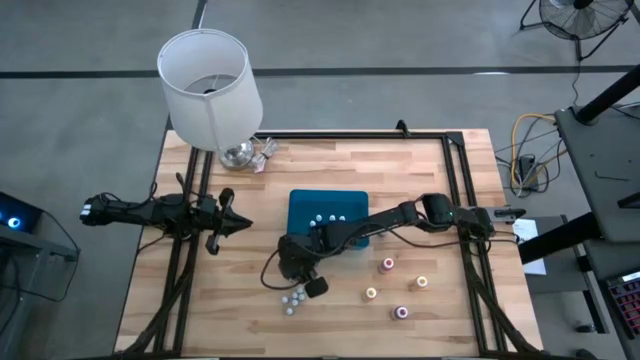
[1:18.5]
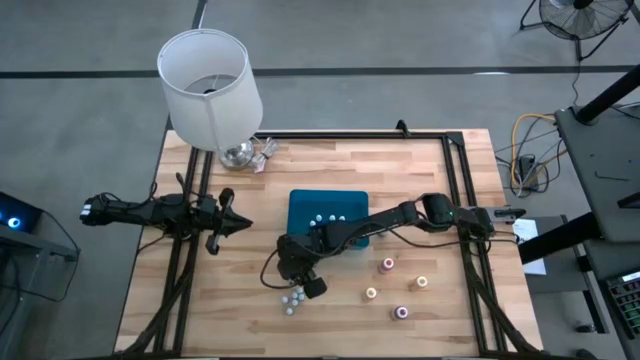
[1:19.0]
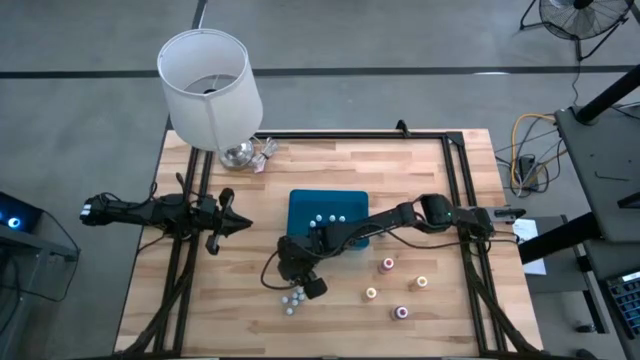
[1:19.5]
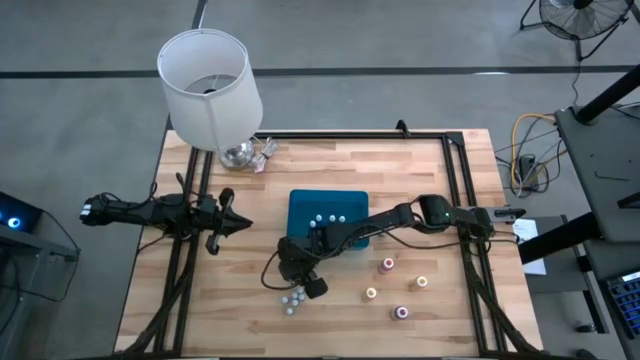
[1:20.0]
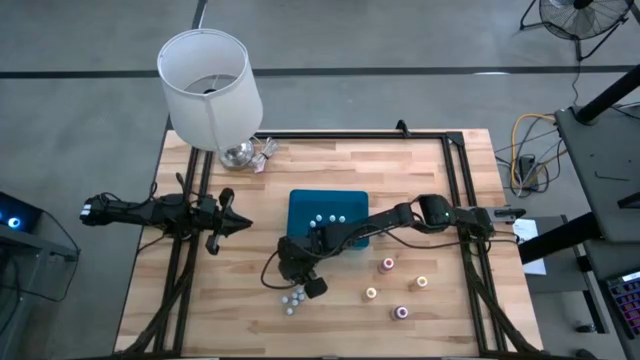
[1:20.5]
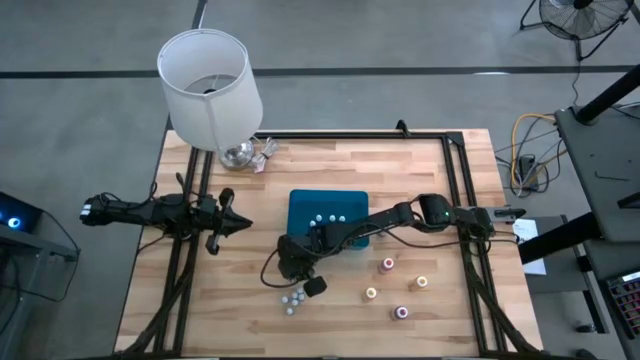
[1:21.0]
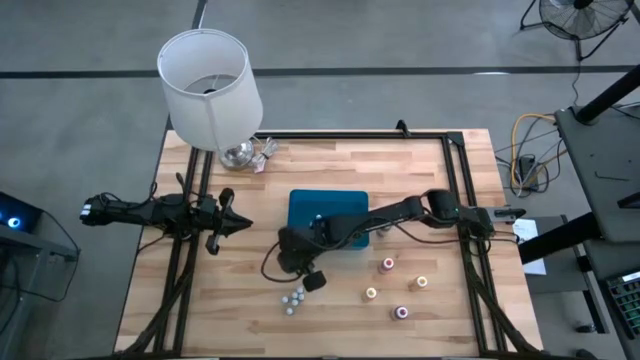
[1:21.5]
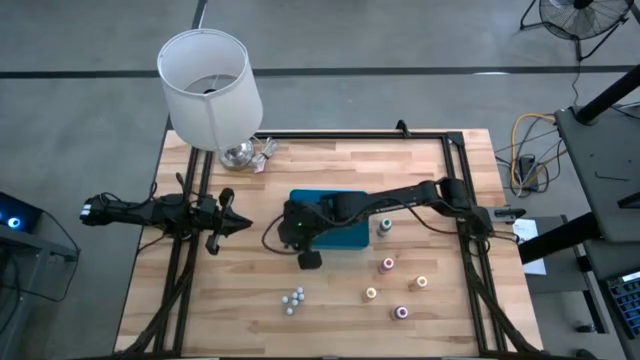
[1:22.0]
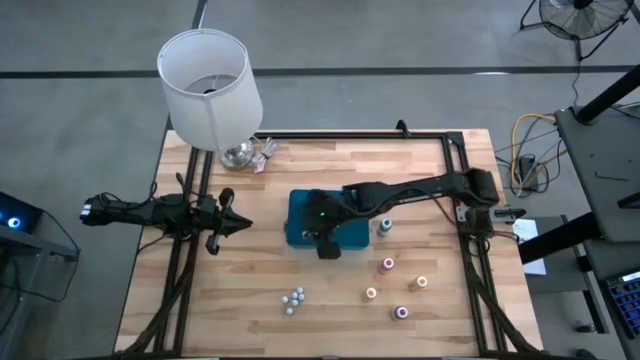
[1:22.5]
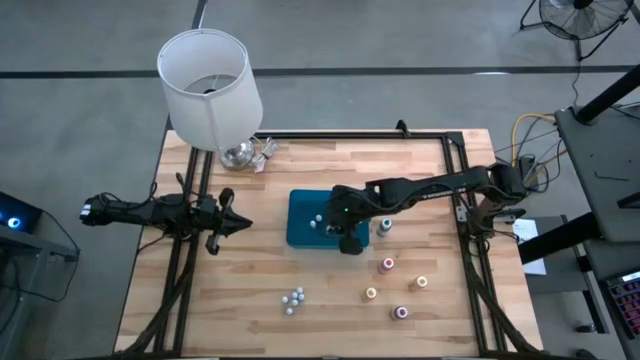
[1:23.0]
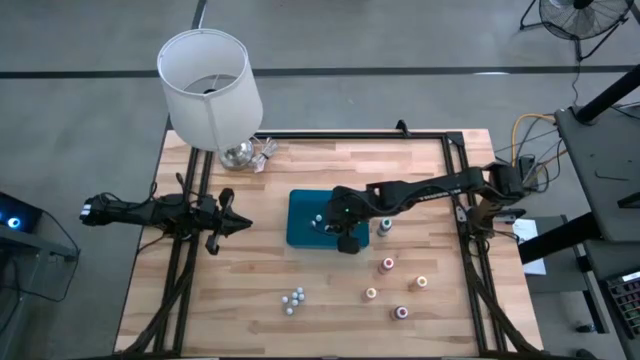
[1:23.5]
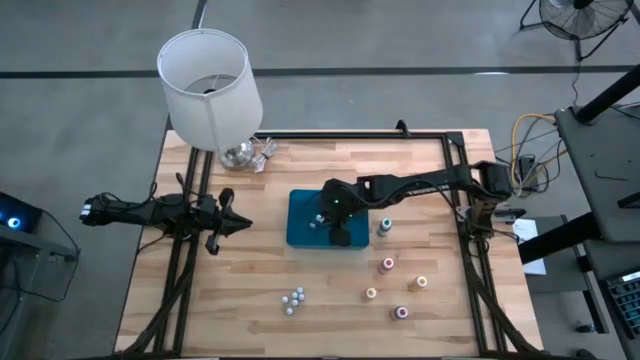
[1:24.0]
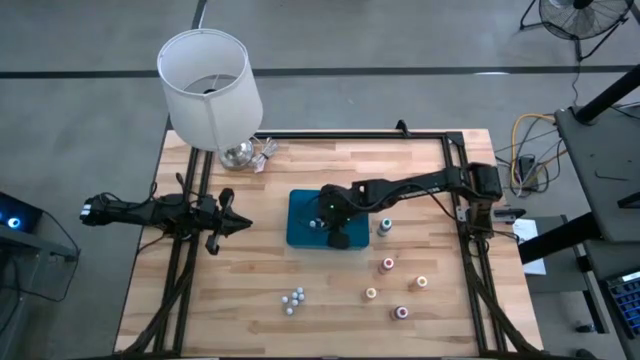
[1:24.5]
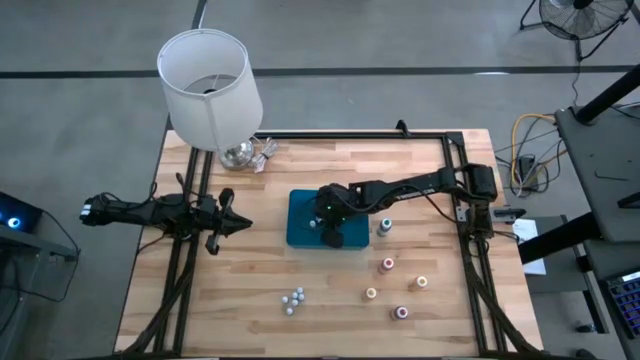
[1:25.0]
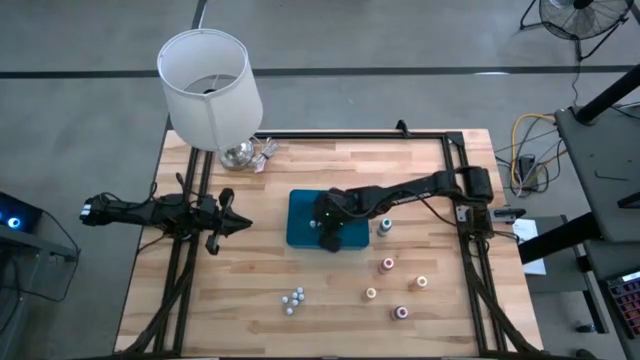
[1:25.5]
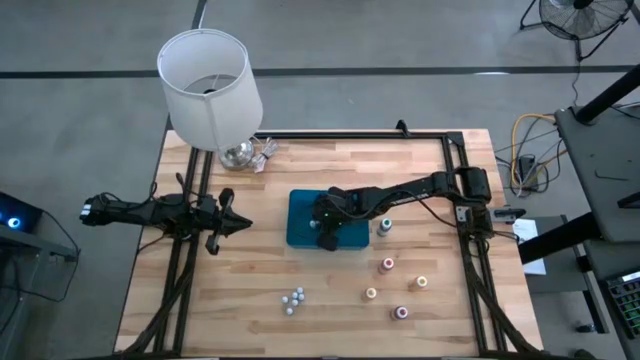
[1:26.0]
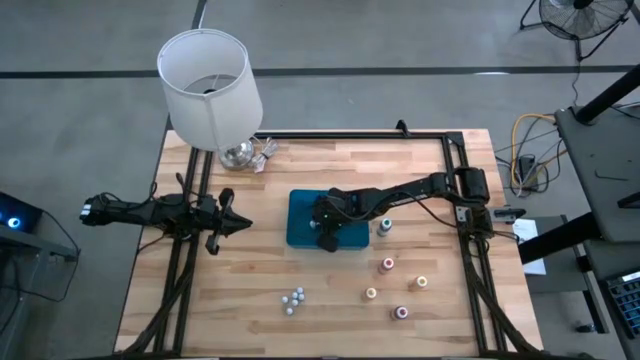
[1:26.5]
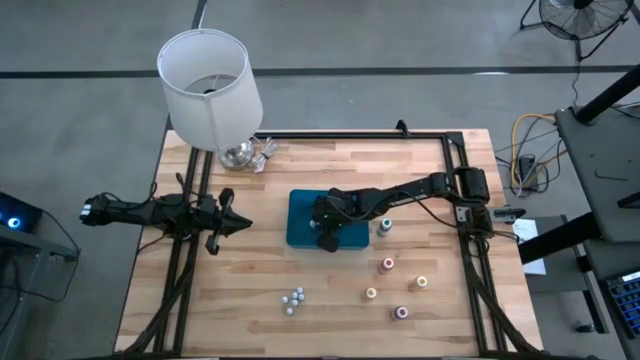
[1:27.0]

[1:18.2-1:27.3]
Task: Pick & Place food coloring
Put the small green food coloring bottle into the blue bin

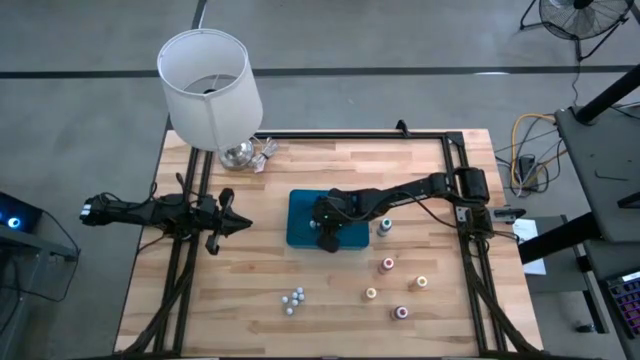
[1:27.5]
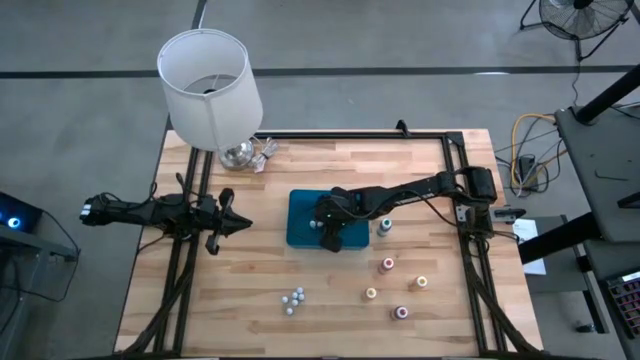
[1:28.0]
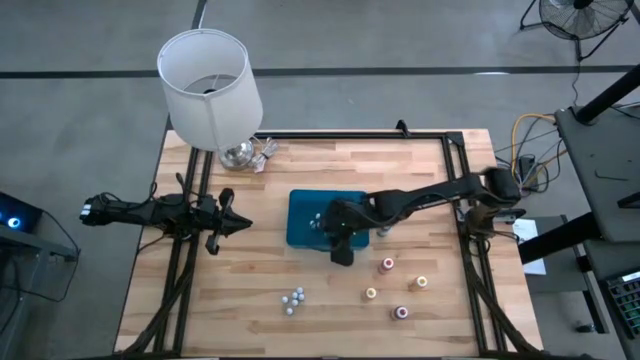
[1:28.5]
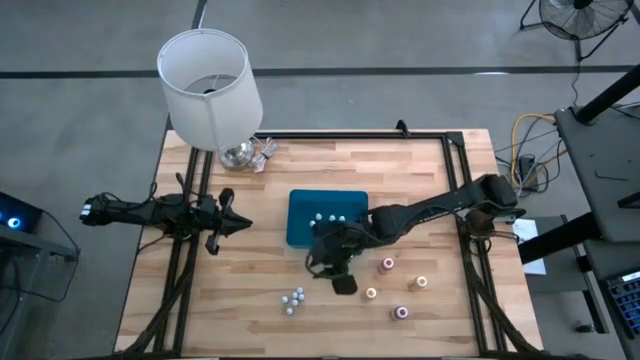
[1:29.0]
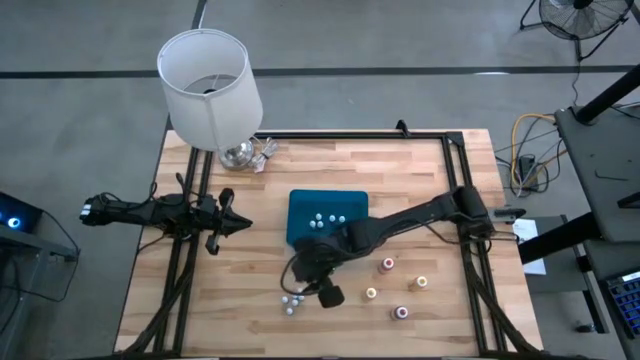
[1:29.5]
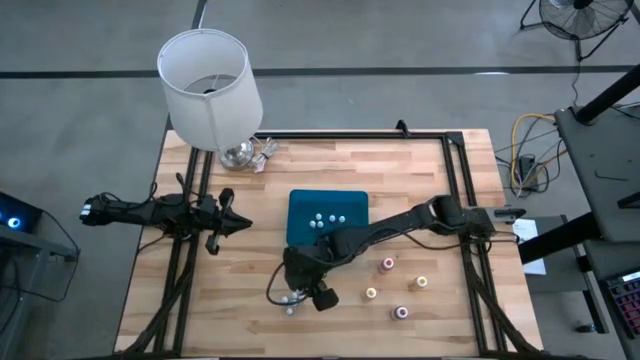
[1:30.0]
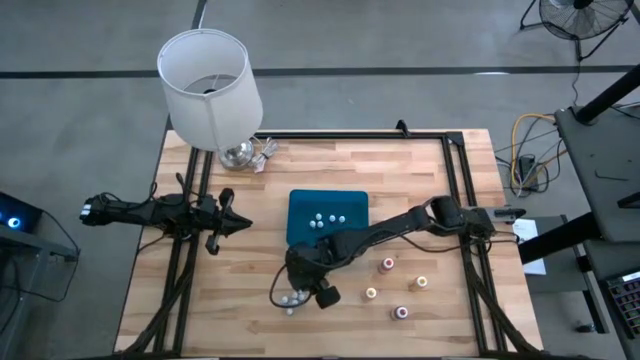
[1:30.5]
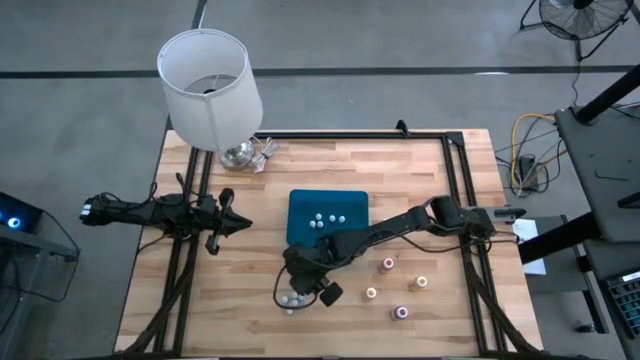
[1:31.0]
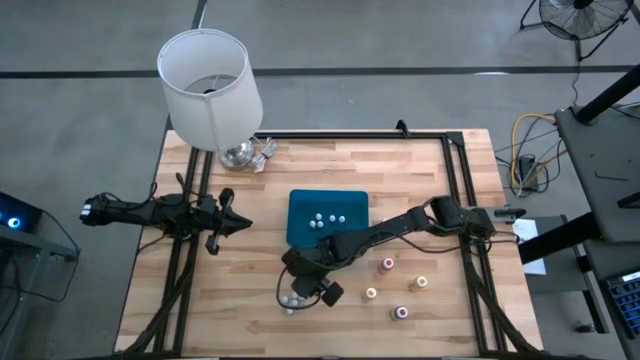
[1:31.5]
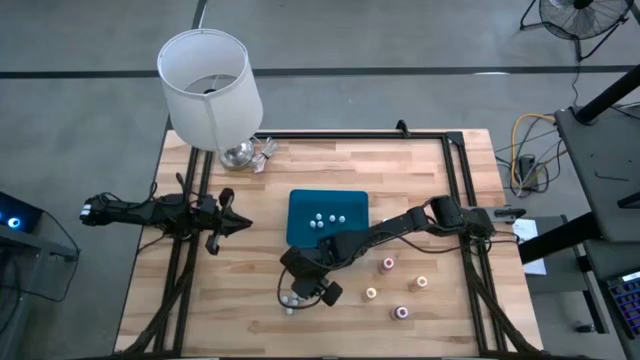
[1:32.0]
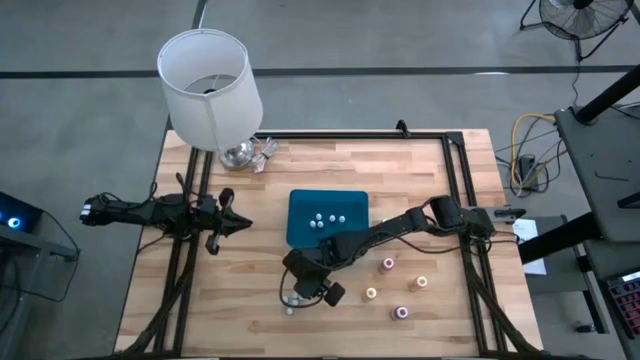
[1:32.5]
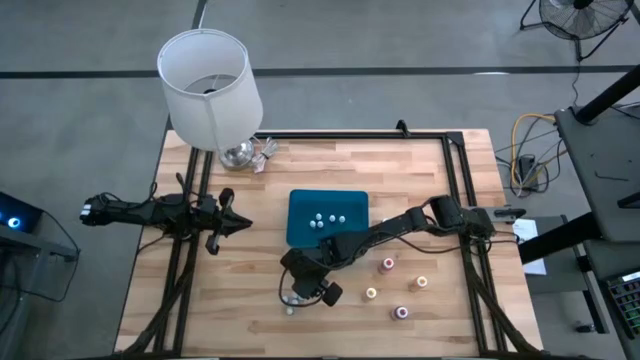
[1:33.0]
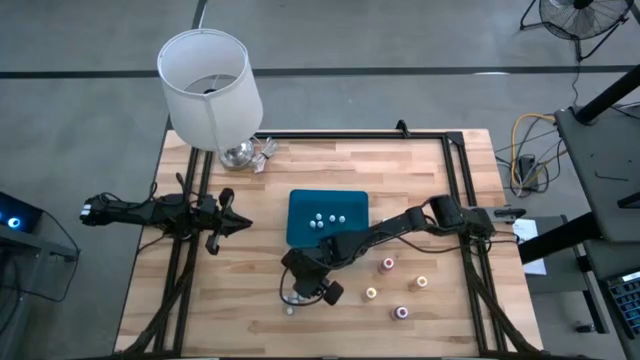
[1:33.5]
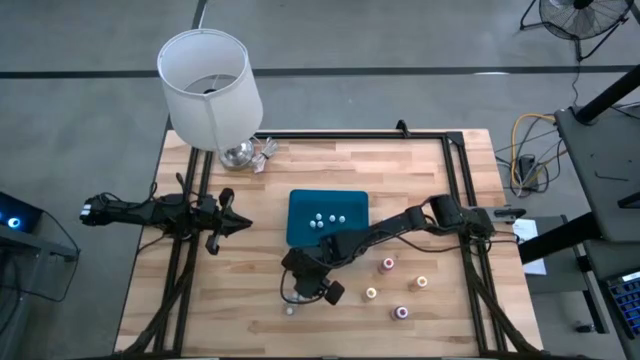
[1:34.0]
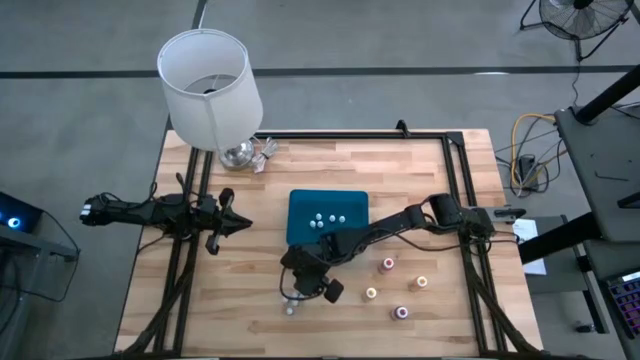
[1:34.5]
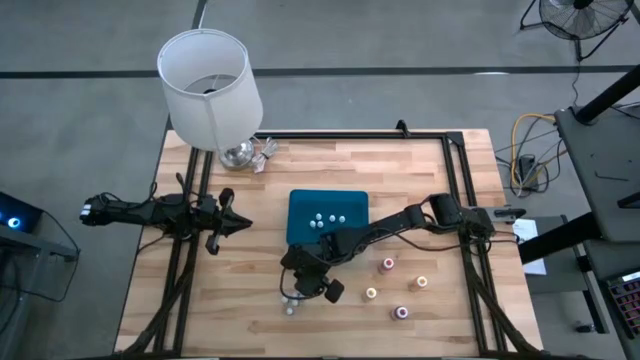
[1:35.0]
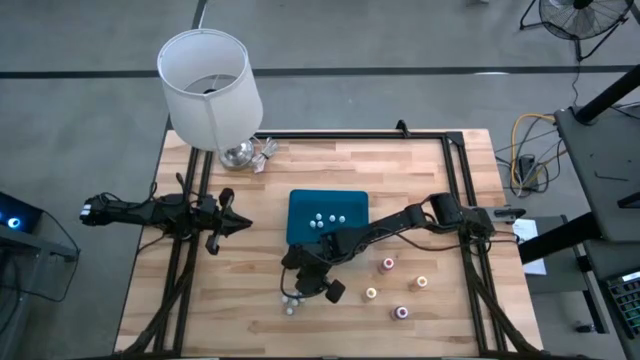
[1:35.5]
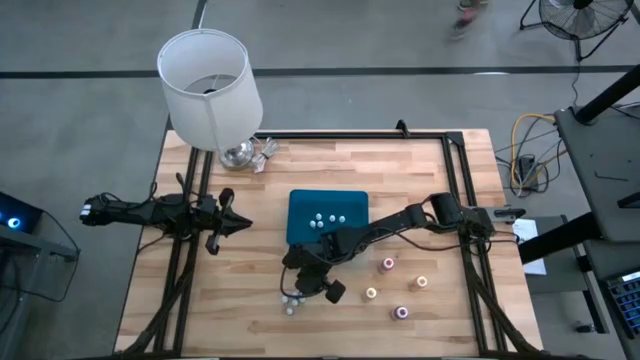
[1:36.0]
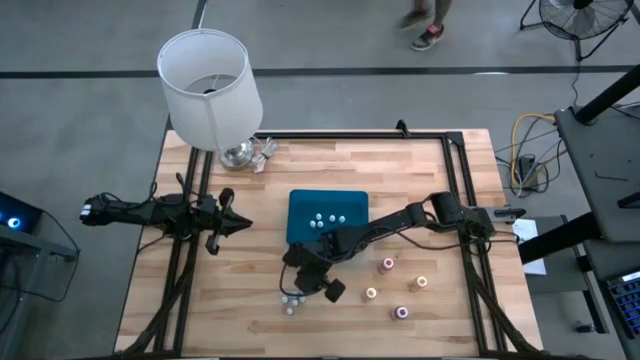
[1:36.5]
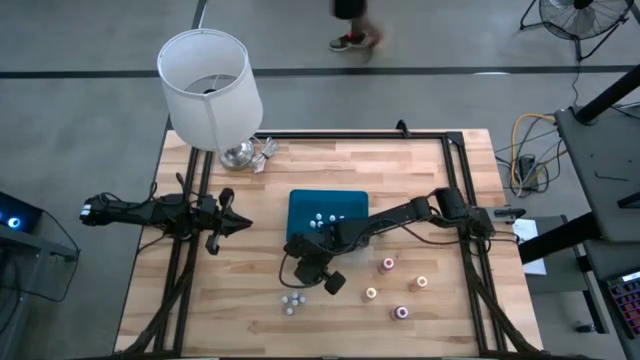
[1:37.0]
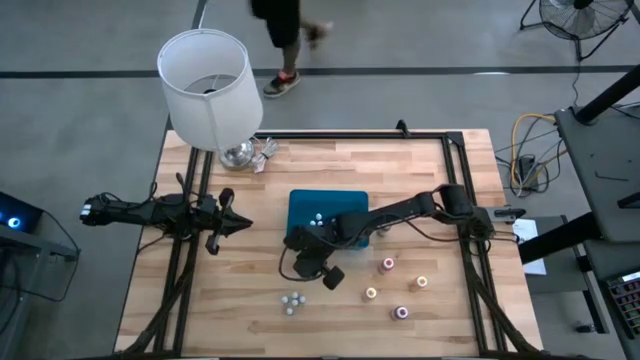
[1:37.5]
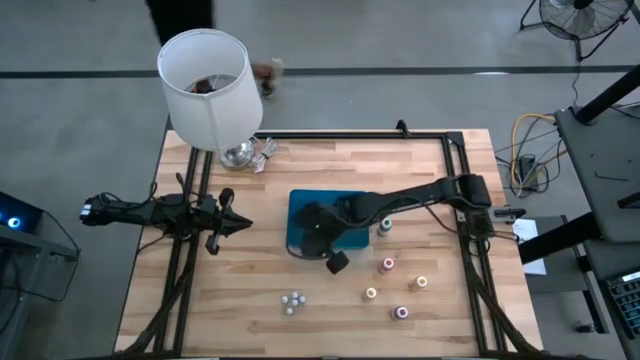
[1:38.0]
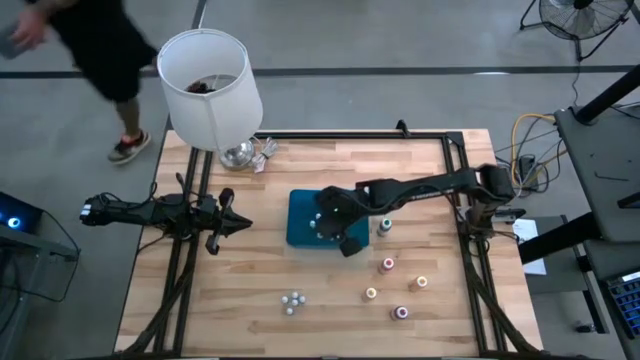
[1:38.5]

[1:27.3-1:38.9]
Put the top small red food coloring bottle into the blue bin
